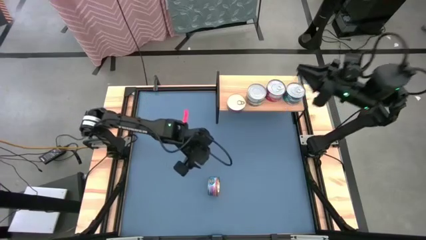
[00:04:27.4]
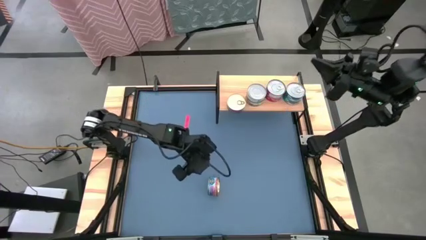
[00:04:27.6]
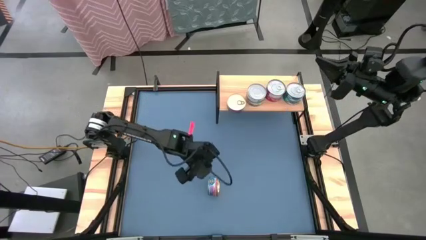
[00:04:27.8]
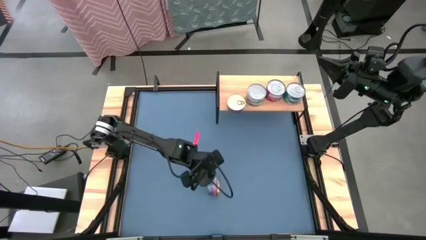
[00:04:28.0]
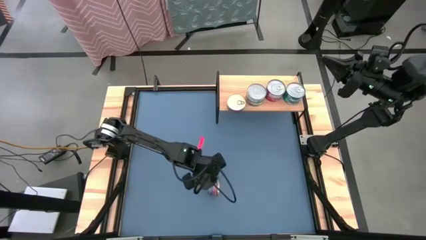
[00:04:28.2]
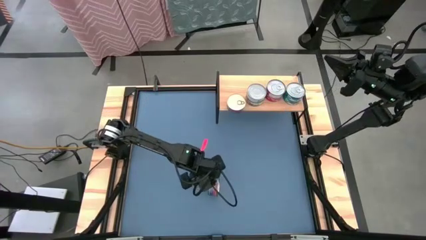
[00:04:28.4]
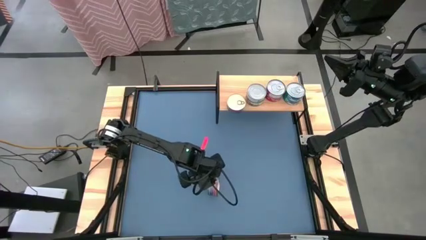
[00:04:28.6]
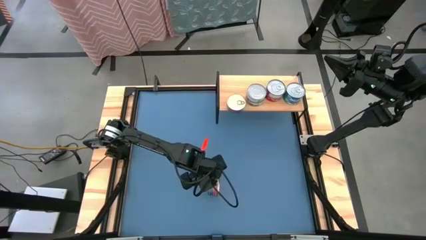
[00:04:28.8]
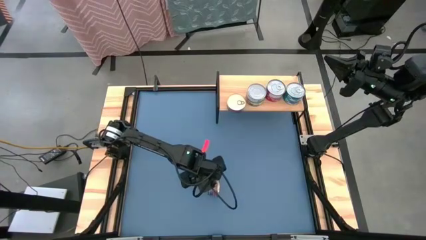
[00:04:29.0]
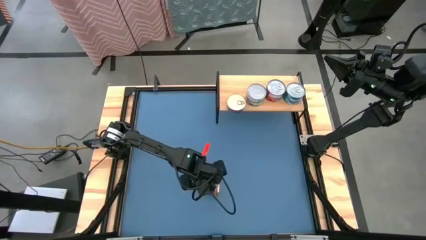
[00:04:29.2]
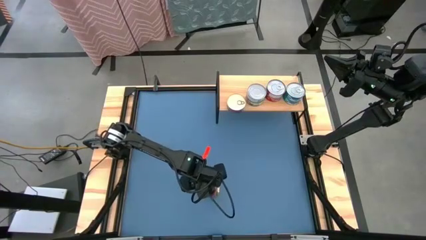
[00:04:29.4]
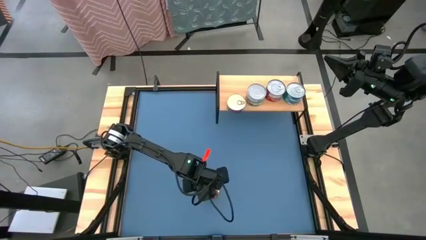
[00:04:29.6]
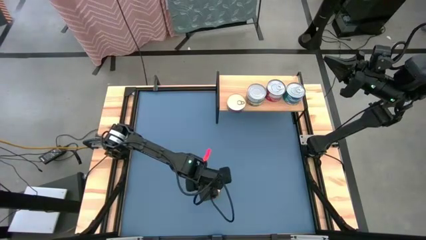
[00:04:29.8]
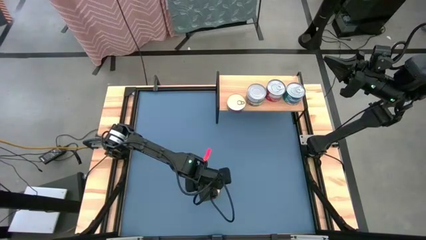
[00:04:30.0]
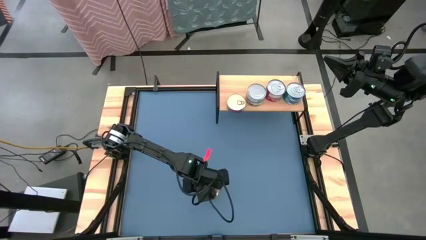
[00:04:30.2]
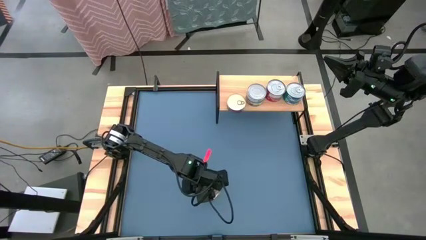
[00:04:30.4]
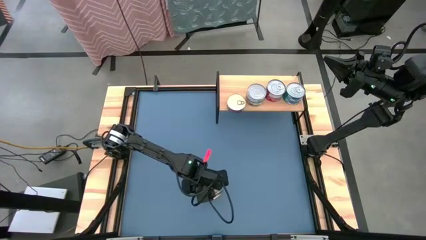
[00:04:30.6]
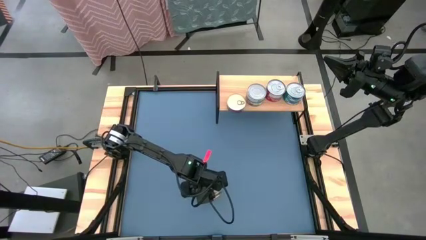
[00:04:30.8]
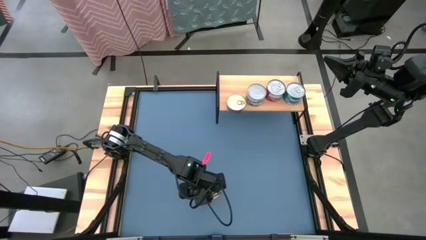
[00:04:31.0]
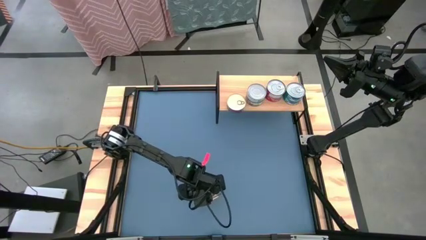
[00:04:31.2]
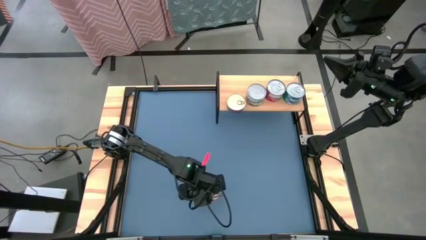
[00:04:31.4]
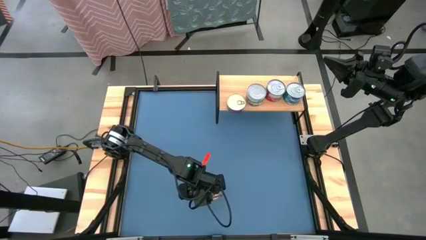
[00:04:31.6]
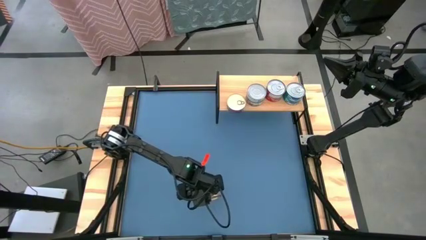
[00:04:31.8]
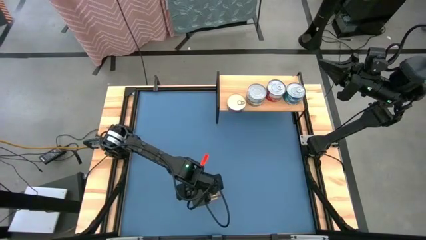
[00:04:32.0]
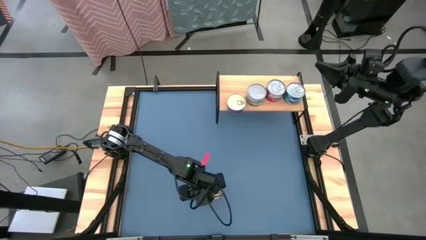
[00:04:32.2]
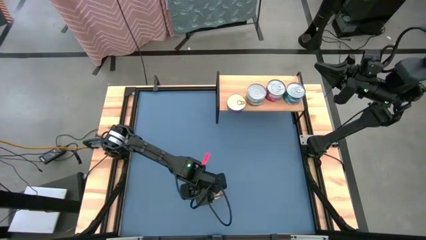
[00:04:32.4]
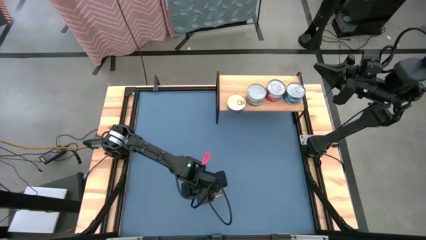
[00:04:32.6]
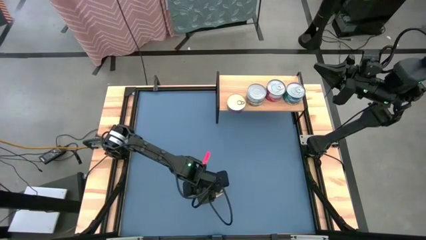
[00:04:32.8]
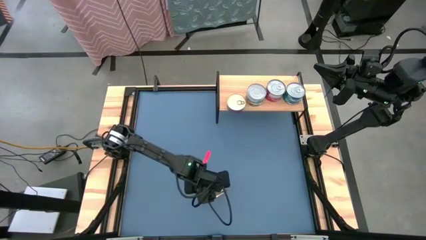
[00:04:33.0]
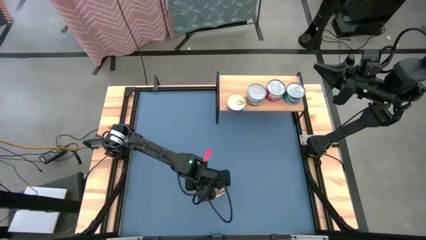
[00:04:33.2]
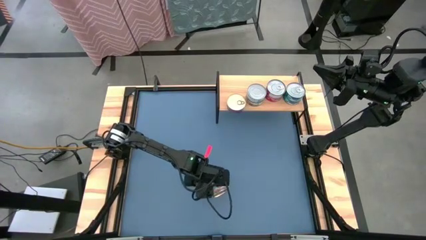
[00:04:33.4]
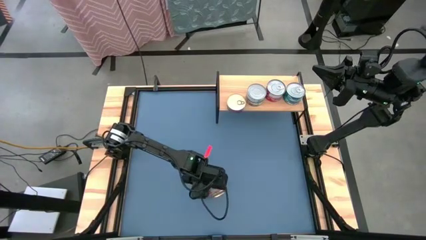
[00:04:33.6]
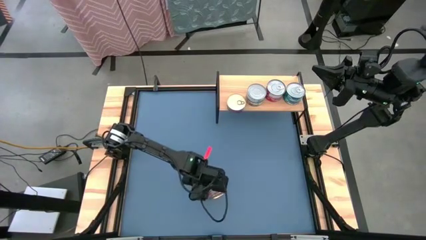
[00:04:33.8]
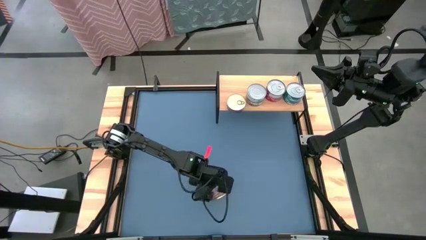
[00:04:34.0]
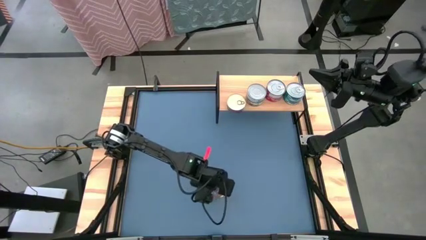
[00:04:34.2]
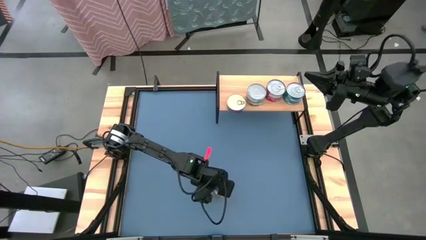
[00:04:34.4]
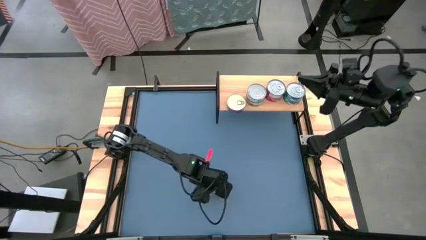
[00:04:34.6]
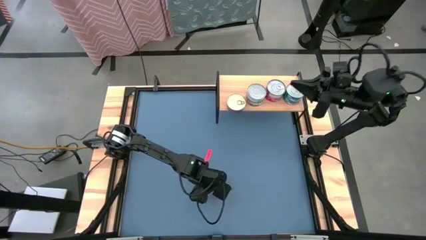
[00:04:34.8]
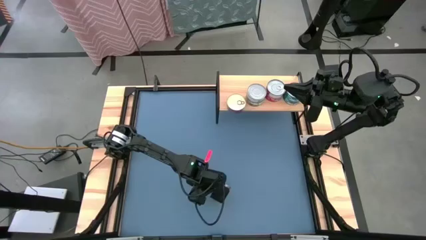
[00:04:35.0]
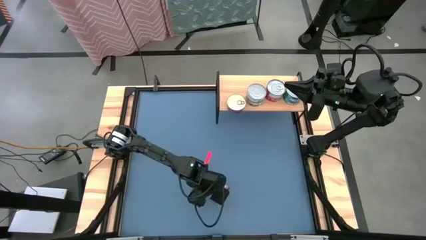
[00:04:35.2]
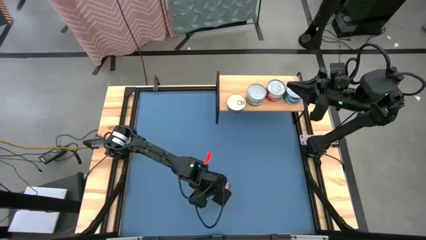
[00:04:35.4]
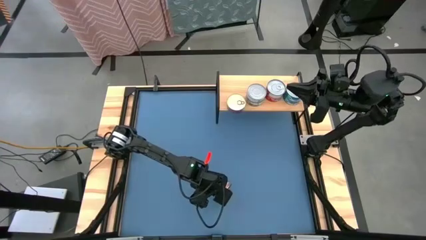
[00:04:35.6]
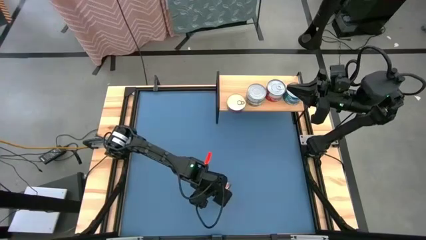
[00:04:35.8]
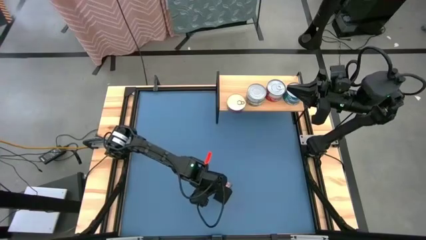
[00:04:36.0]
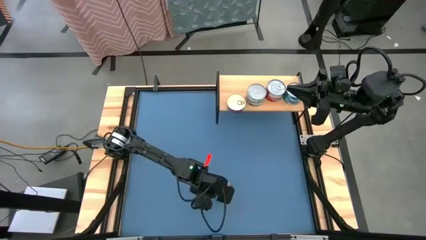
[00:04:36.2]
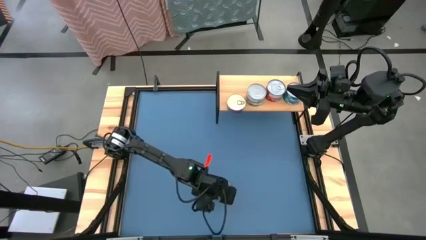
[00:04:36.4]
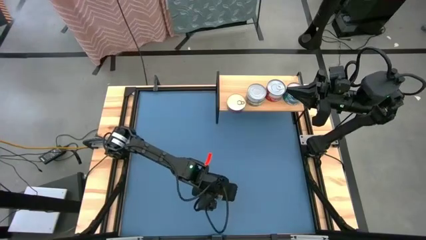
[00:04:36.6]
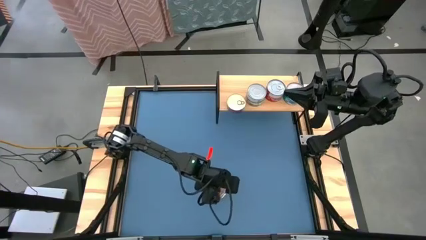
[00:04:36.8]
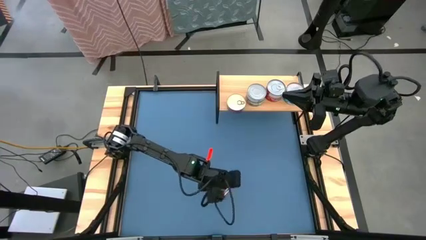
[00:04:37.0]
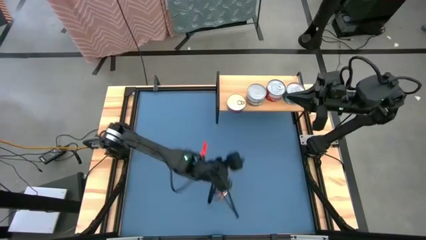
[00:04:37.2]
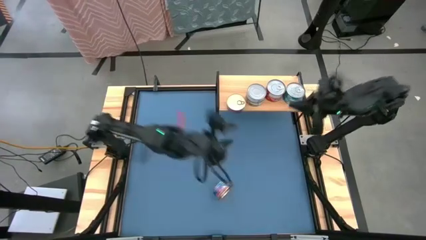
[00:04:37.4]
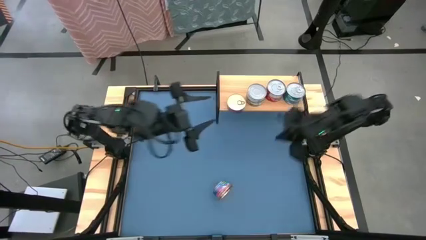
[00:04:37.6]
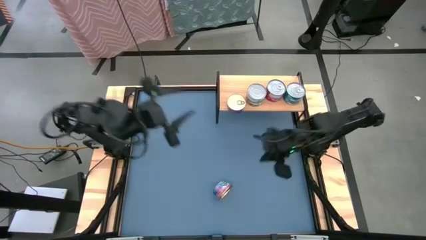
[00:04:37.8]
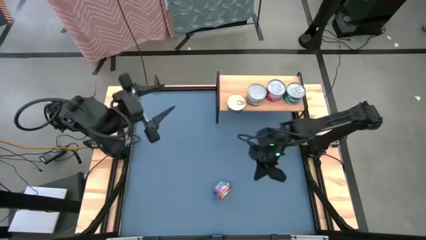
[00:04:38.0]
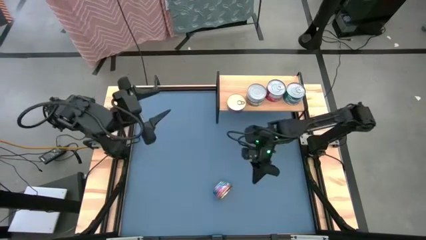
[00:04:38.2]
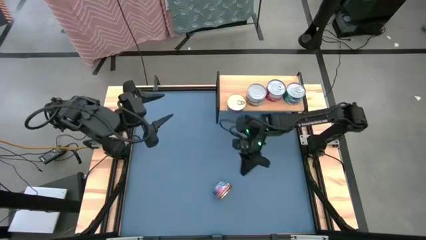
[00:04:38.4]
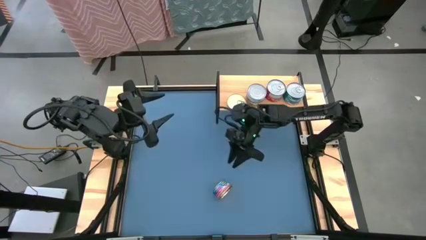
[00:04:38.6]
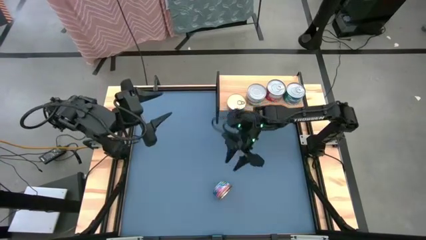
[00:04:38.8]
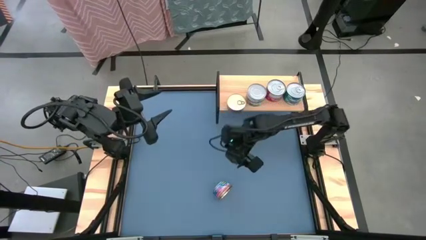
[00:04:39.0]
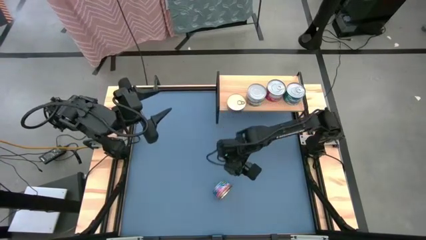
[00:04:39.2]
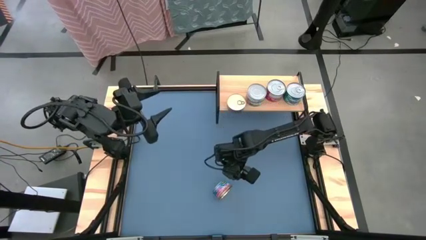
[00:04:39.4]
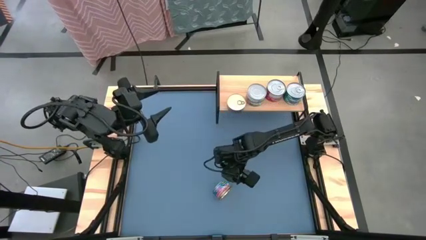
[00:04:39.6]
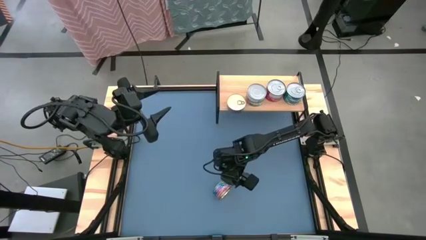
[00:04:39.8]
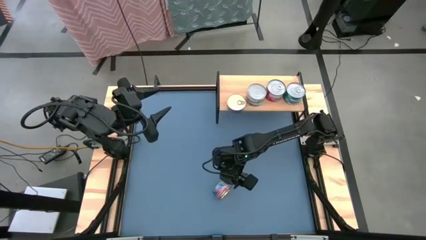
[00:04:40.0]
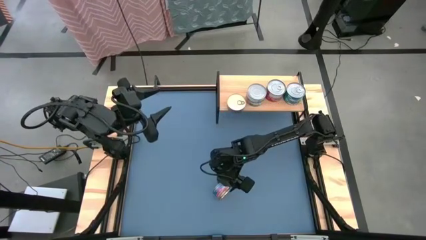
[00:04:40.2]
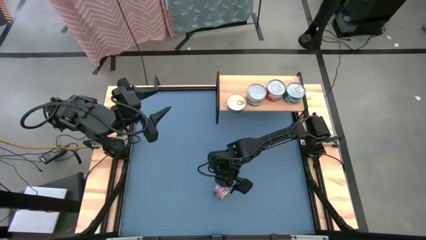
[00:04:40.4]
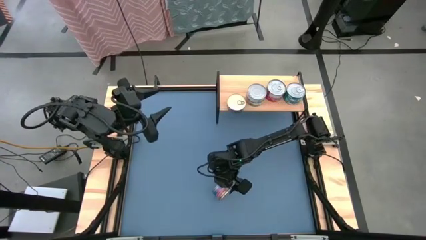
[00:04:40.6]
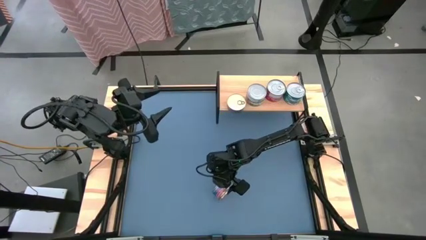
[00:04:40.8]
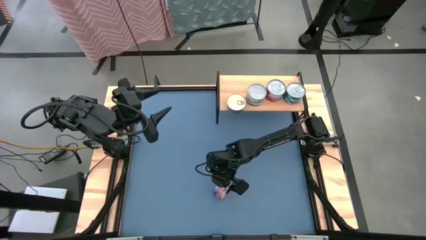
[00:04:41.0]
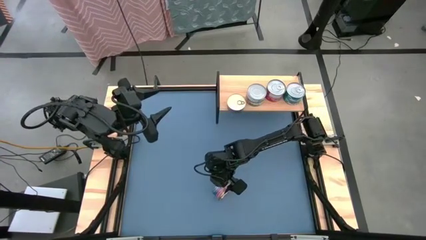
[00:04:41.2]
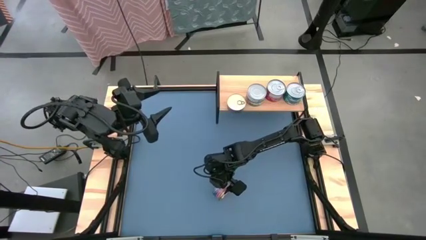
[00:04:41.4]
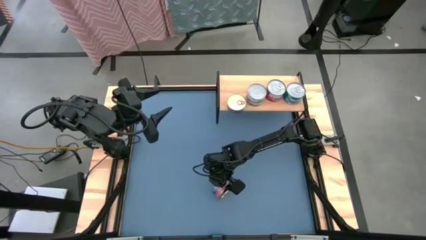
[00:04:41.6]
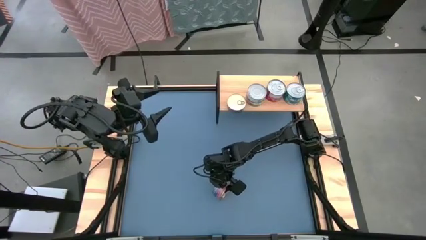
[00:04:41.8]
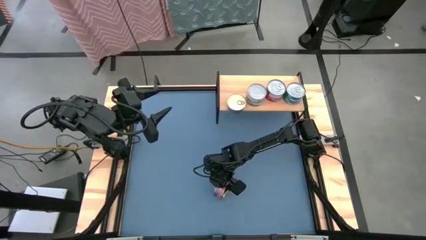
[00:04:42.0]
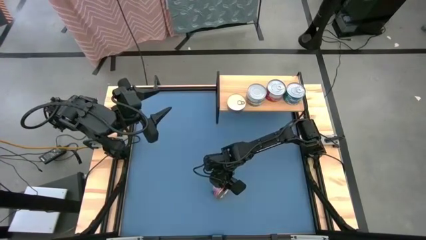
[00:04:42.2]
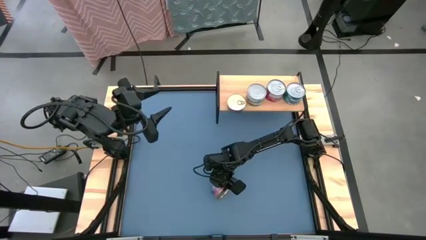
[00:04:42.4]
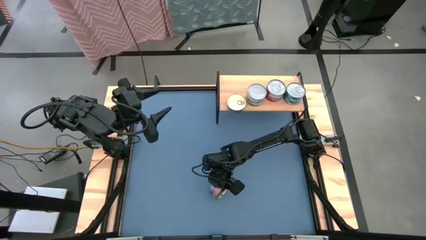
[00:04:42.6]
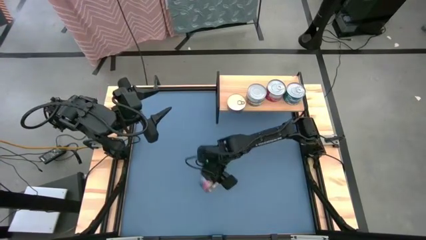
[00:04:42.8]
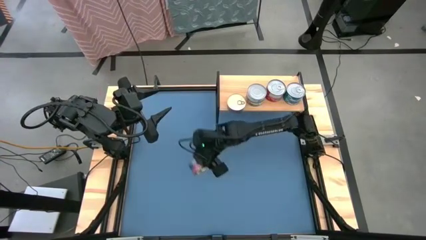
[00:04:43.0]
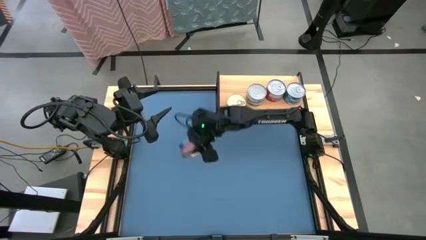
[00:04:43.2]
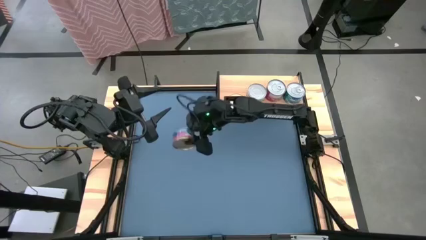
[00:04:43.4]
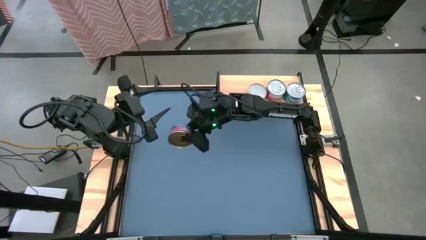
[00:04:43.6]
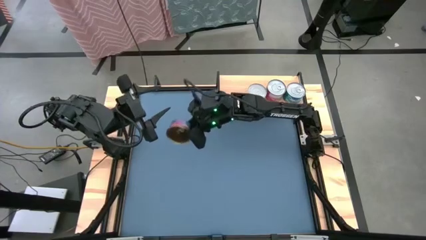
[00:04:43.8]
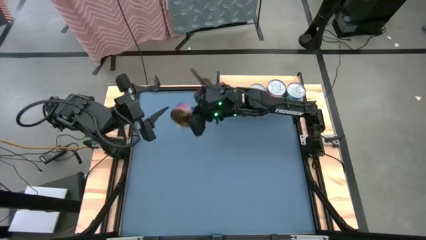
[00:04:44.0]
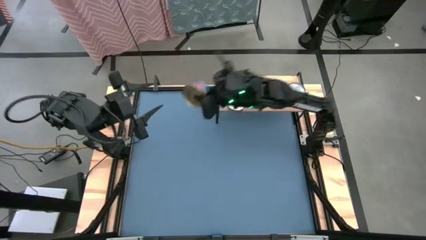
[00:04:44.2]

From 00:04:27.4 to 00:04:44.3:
Task: Stack canned seafood by type on shelf
Stack the blue-pink tuna can on top of the blue-pink tuna can on the shelf
